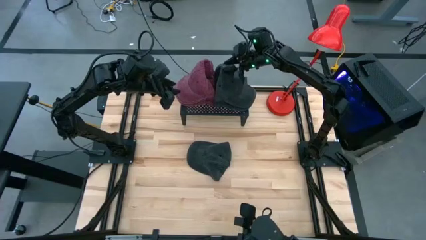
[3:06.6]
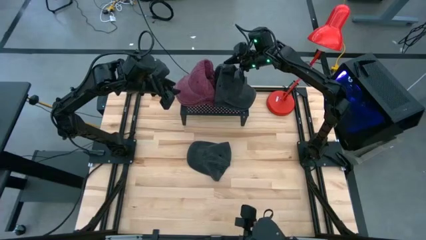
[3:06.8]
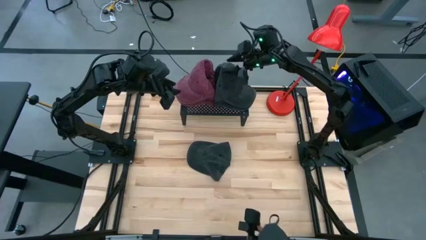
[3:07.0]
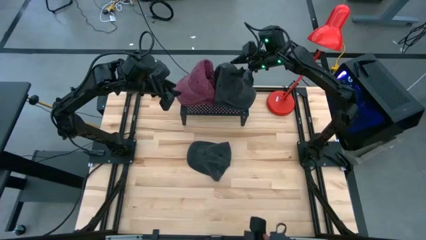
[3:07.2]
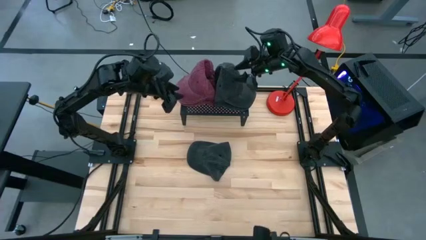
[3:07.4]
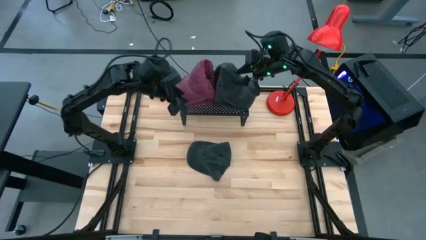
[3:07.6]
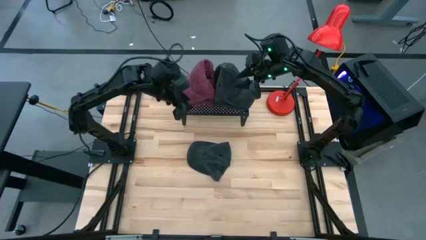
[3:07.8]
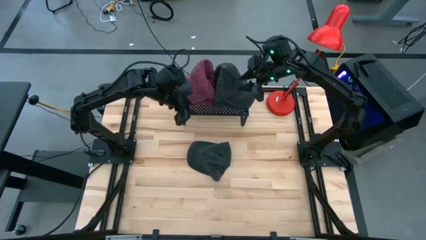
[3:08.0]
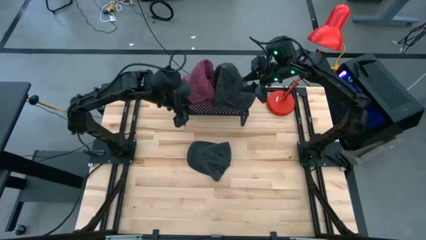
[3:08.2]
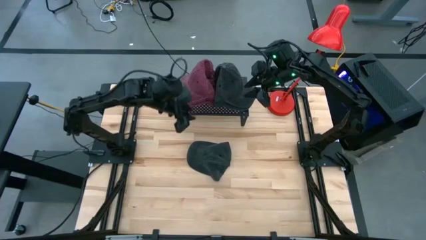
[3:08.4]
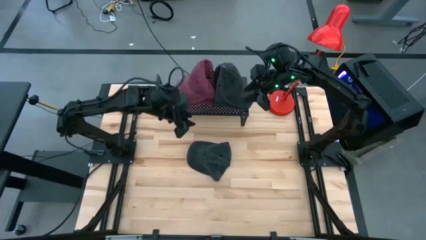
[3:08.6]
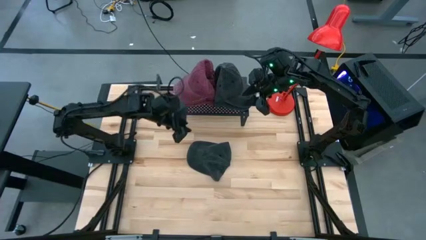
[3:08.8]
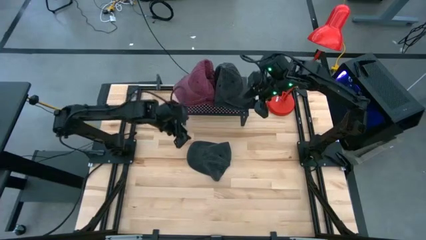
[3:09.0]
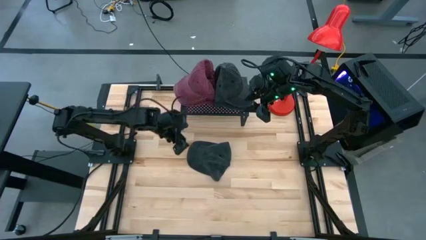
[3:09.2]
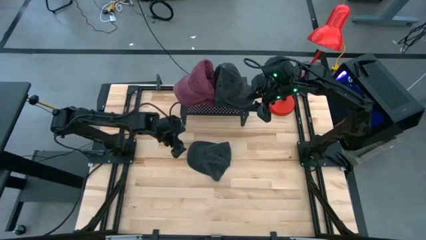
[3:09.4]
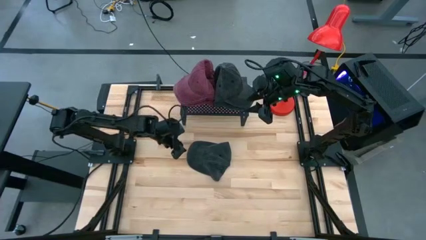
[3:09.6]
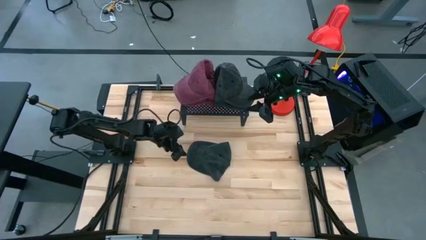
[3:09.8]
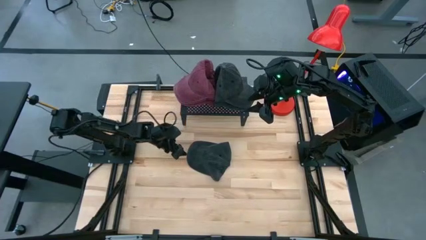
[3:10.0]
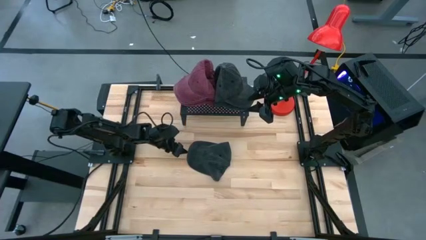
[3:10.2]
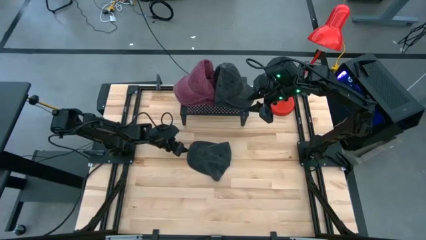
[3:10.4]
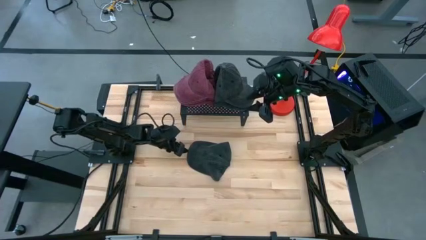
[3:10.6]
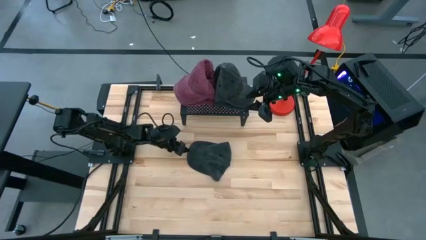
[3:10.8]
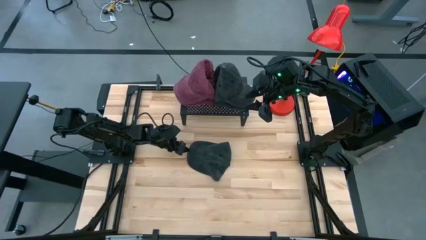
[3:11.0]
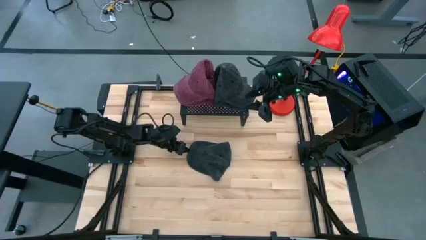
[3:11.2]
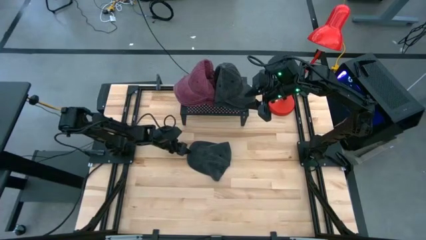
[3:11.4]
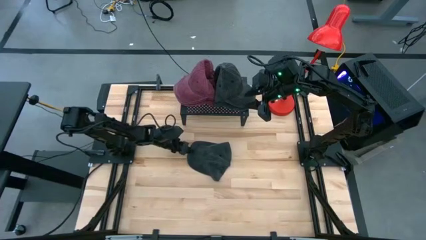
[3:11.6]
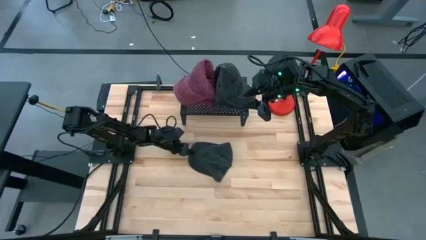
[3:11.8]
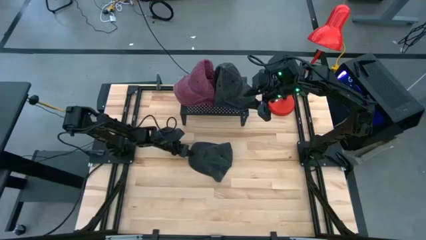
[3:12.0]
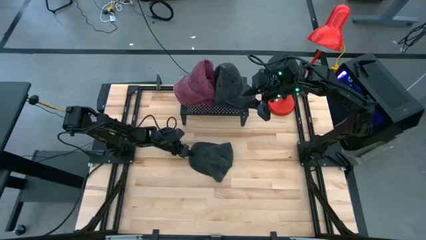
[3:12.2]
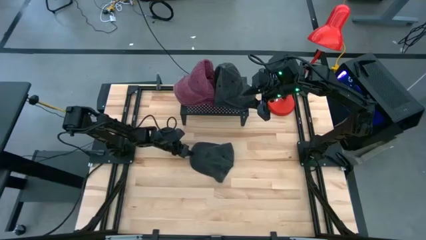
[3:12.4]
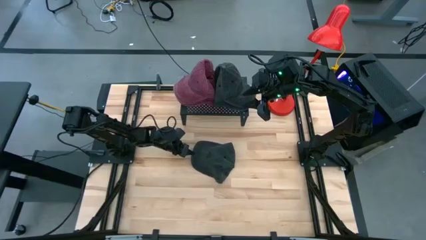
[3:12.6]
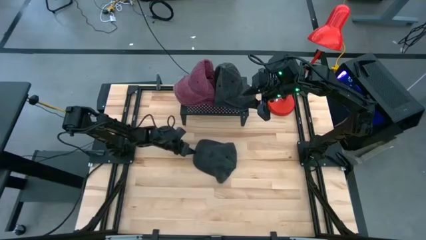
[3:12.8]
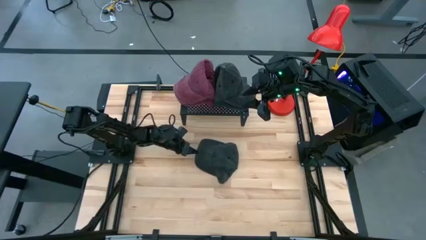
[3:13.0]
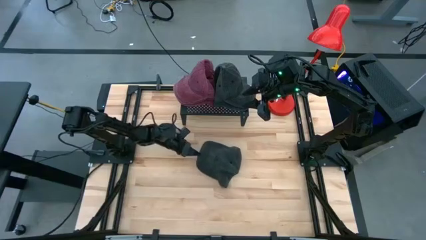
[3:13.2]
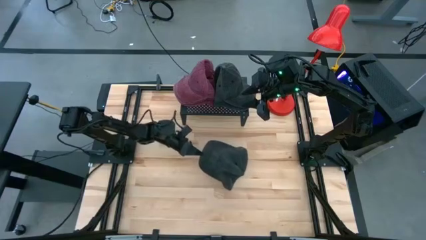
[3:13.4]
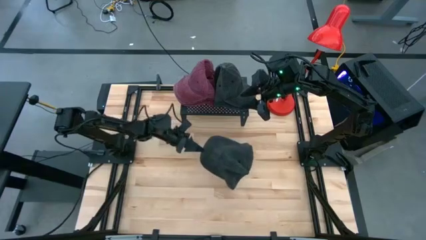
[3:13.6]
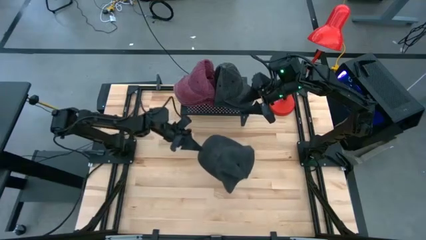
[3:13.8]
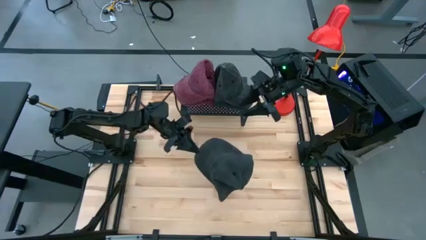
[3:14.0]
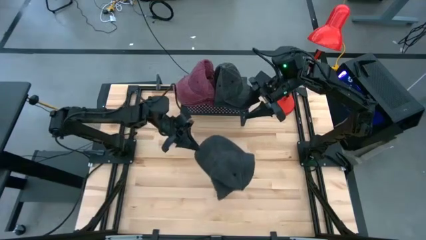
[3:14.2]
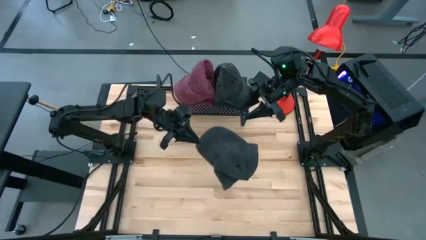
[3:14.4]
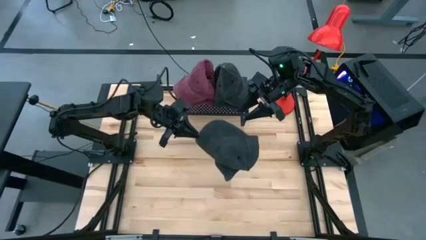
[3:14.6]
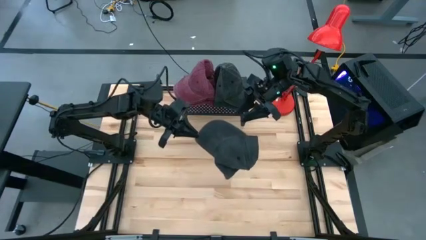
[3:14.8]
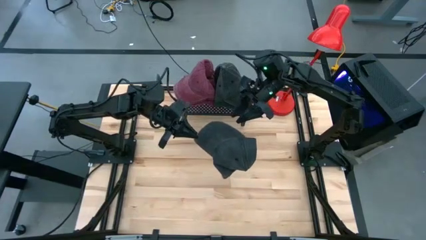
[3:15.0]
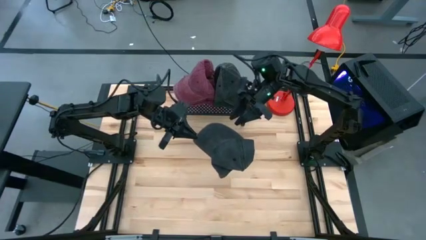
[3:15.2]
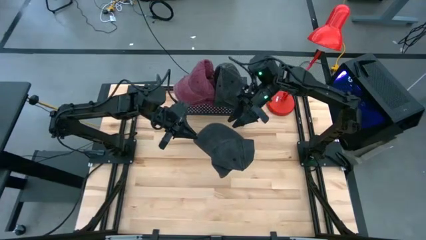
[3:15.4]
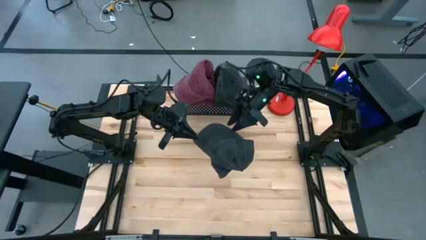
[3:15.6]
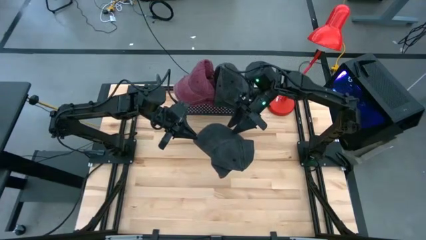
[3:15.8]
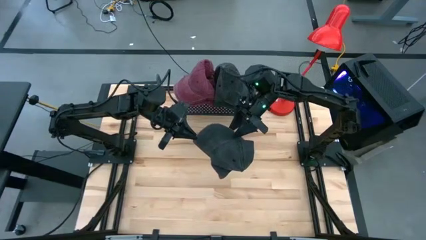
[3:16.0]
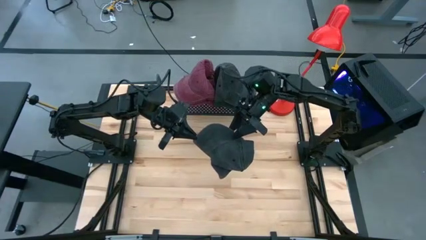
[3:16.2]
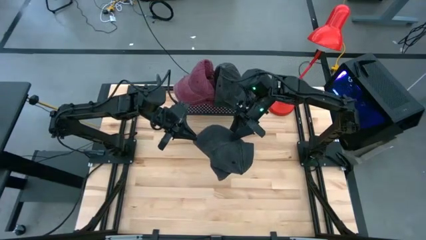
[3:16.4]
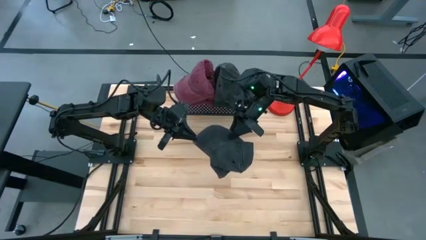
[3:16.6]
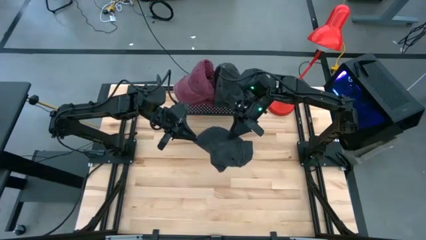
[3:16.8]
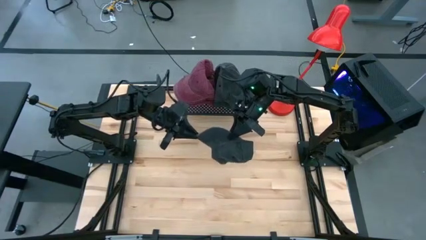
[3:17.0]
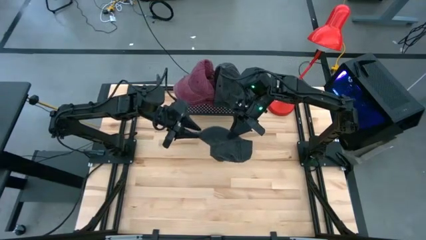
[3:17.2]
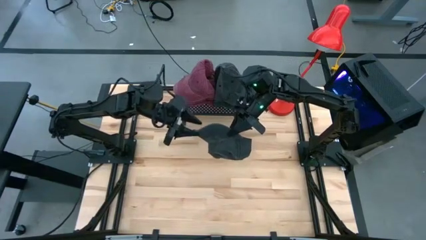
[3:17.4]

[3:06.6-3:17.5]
Task: Pick & Place hat
Put the black cap on top of the stacked black caps on the shelf

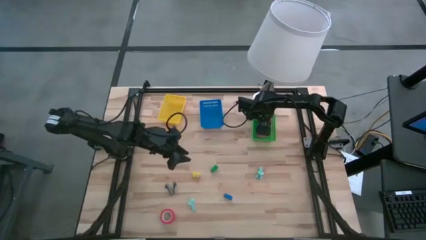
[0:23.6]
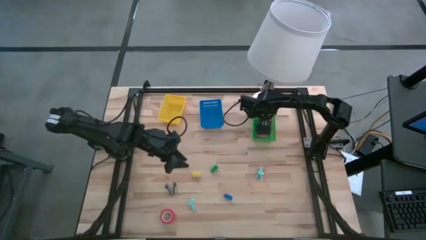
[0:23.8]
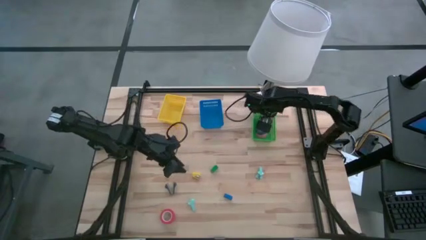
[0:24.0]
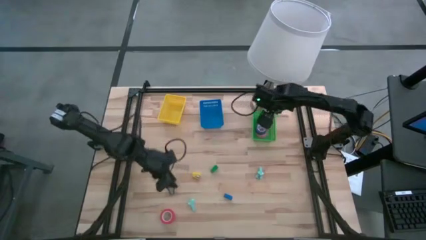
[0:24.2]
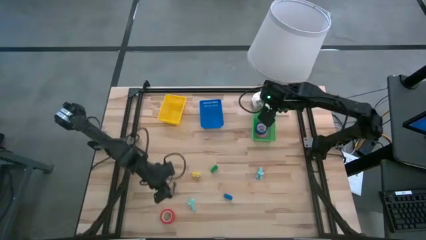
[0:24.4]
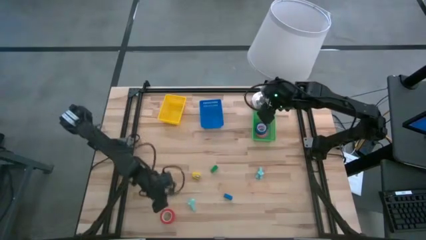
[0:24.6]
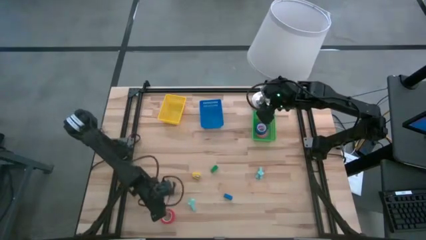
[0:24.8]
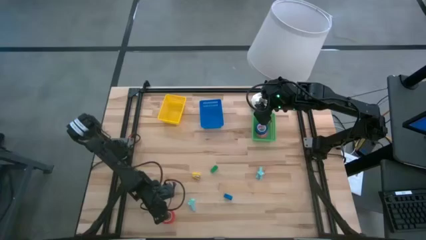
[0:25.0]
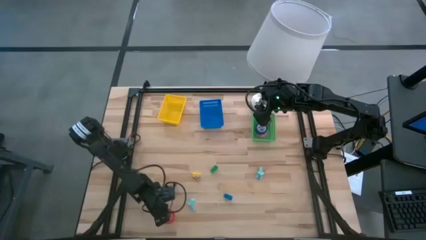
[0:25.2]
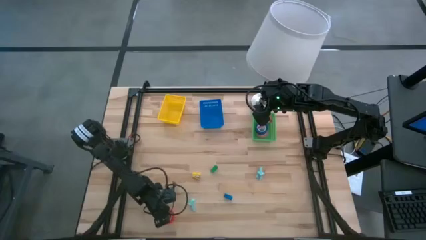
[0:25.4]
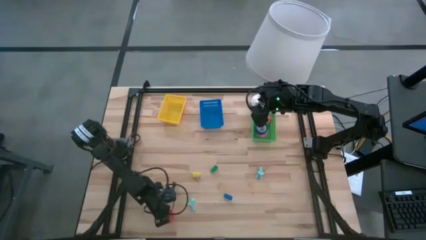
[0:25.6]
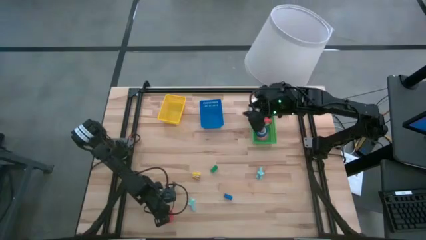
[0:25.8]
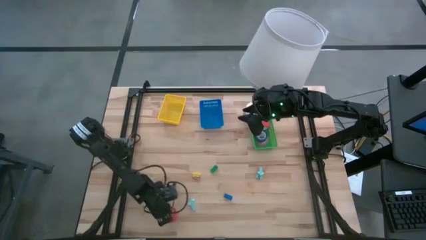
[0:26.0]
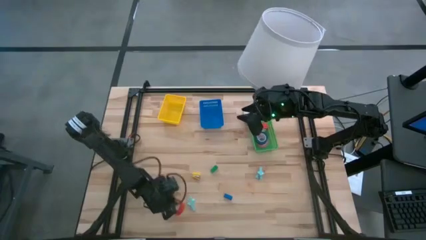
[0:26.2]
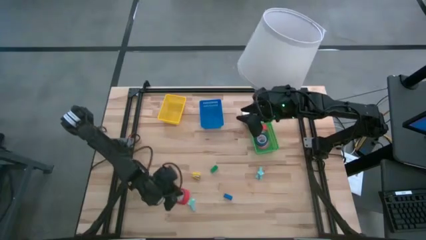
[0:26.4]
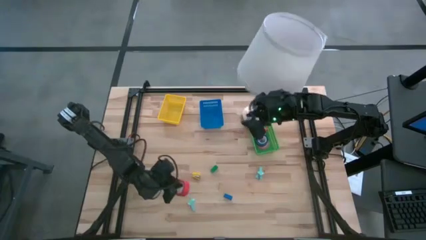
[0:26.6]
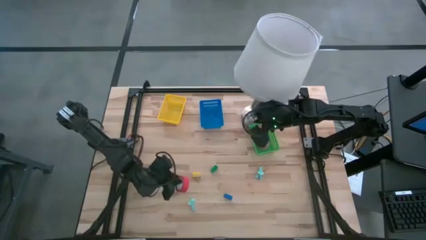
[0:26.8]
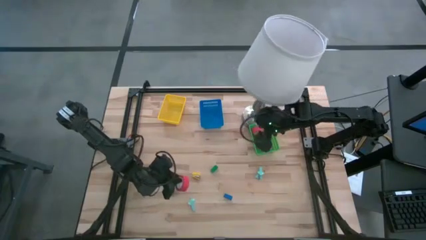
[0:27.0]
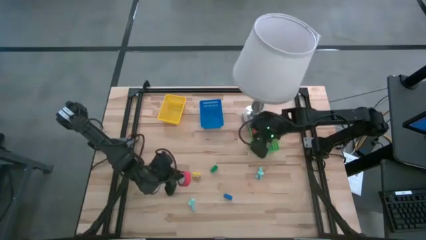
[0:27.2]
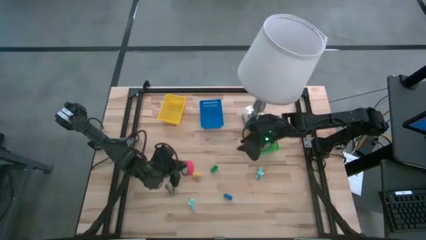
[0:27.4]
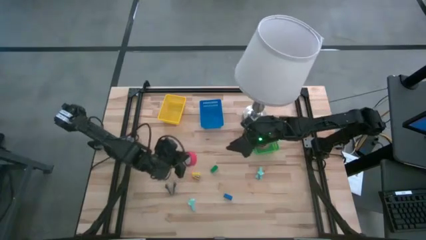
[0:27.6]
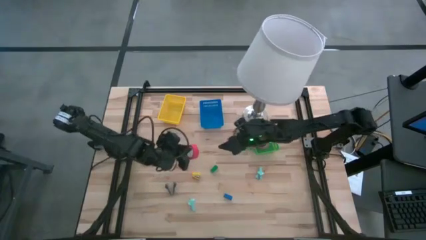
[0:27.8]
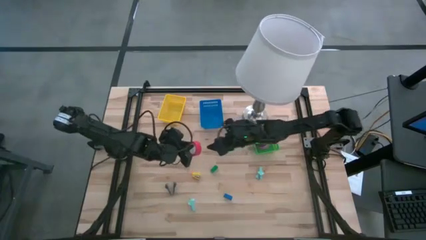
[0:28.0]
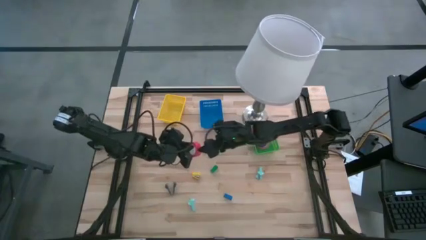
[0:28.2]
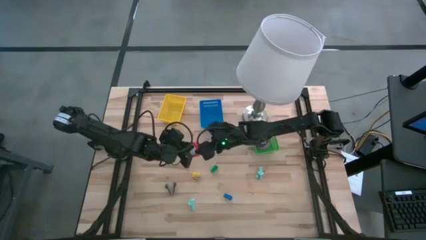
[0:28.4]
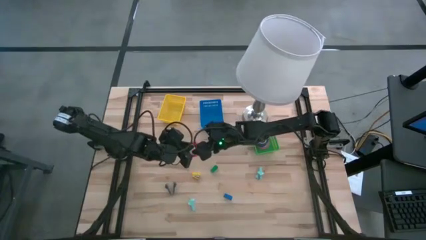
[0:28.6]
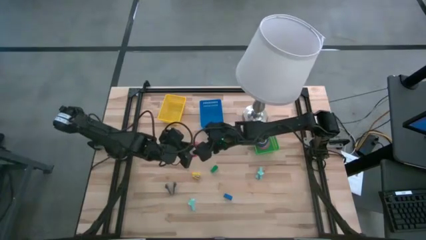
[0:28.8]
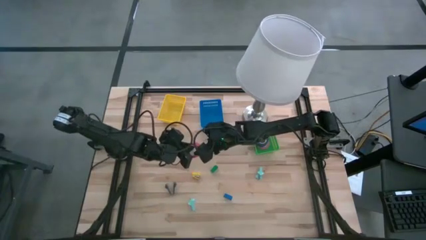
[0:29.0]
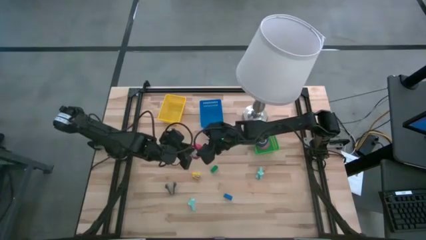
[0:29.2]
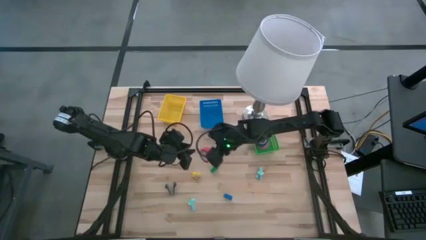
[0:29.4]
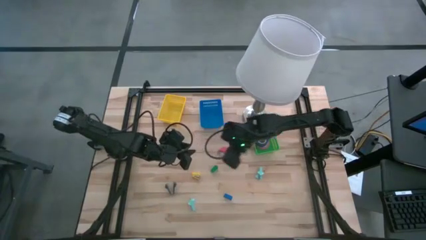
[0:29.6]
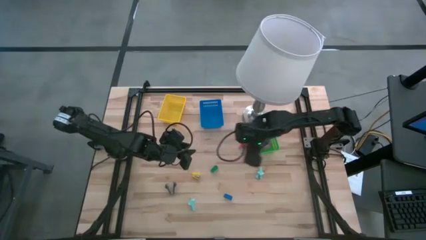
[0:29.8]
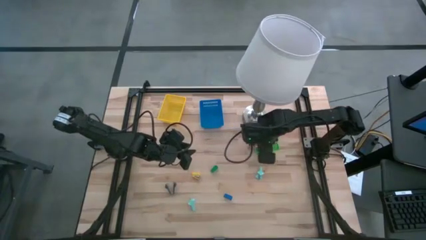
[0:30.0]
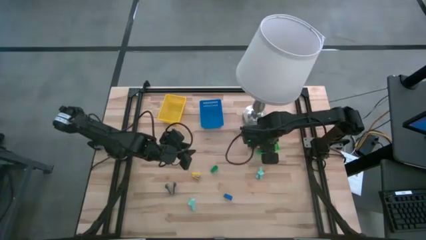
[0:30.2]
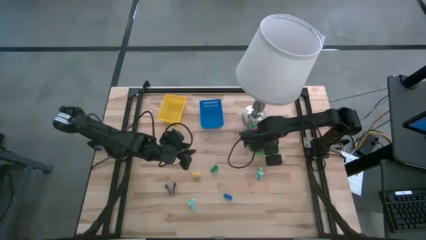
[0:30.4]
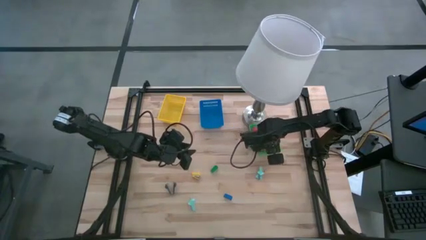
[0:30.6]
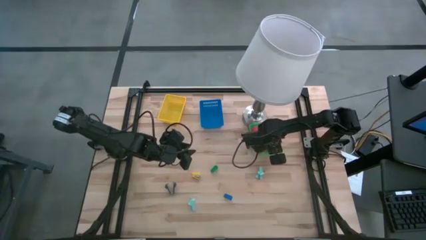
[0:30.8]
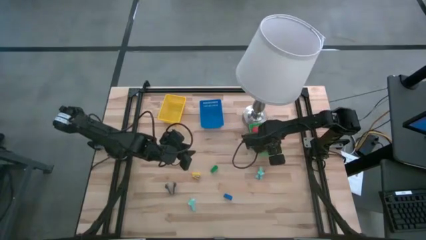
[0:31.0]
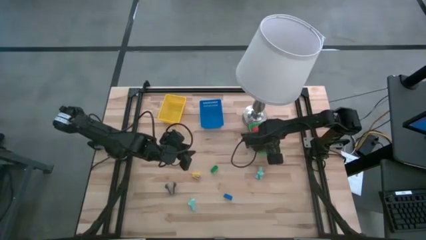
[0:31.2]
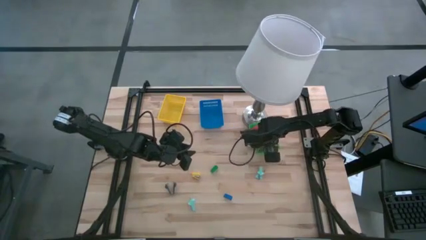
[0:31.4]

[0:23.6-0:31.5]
Task: Pick and place Stapler, Stapler remover, tape
Put the orange tape into the green bin
